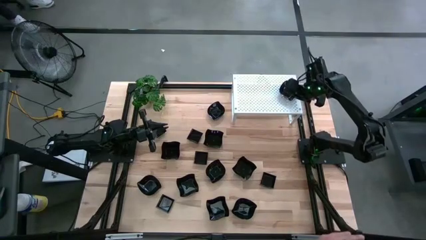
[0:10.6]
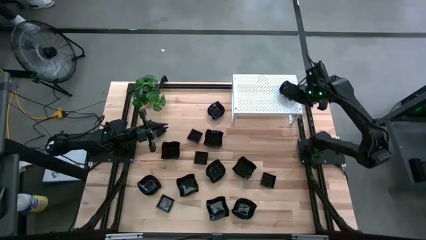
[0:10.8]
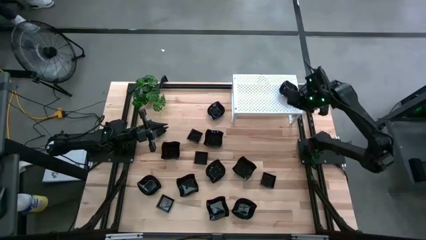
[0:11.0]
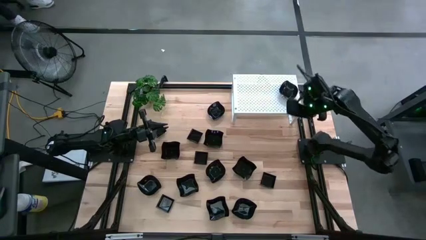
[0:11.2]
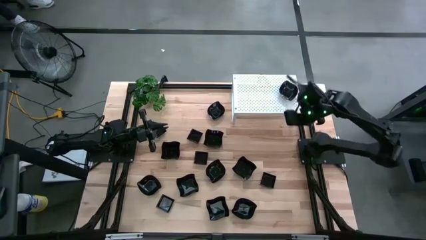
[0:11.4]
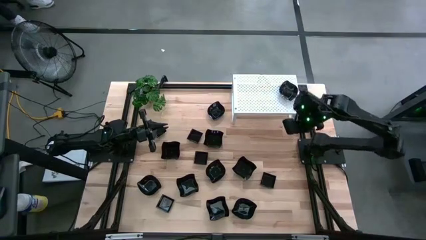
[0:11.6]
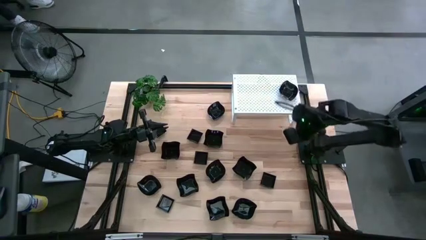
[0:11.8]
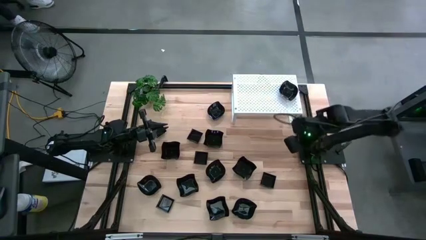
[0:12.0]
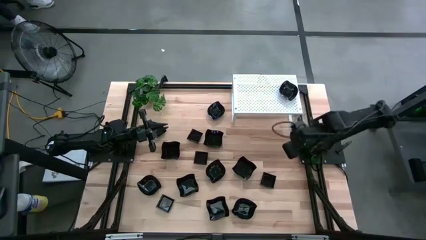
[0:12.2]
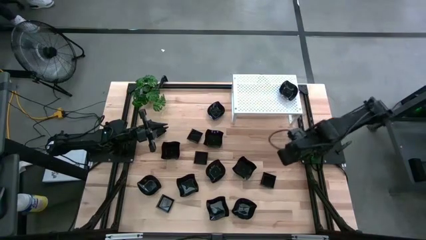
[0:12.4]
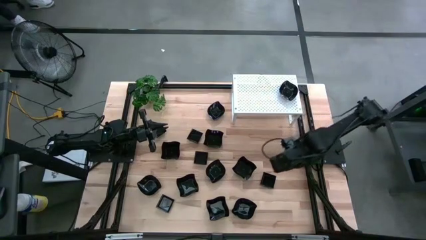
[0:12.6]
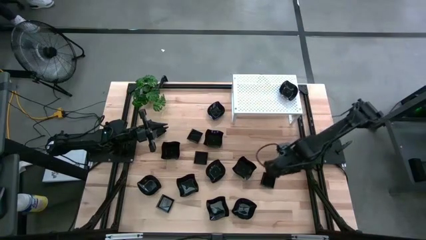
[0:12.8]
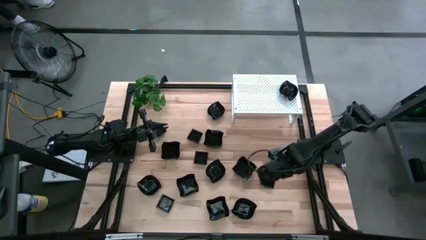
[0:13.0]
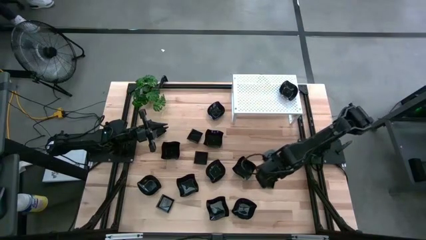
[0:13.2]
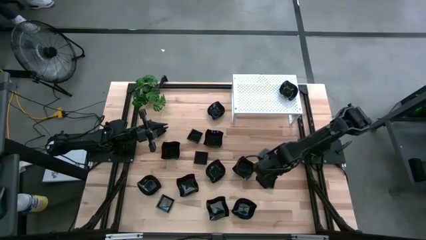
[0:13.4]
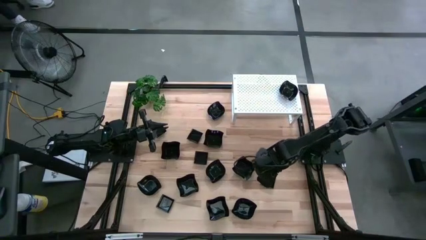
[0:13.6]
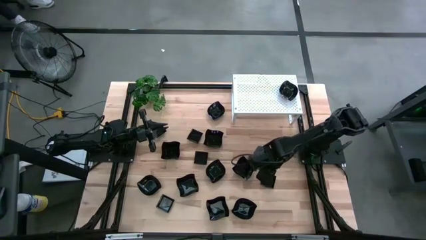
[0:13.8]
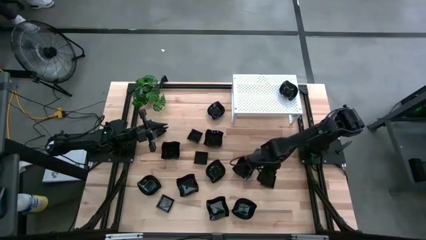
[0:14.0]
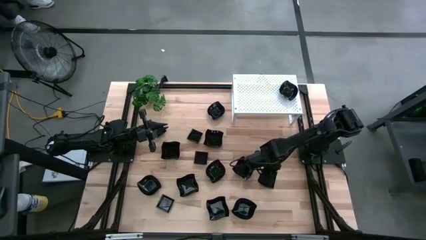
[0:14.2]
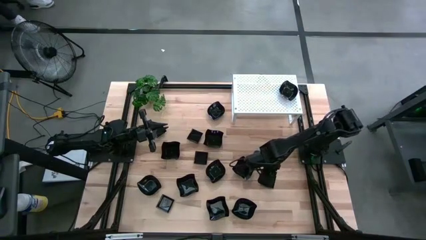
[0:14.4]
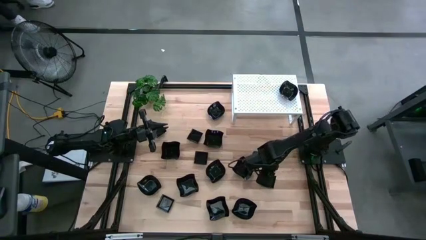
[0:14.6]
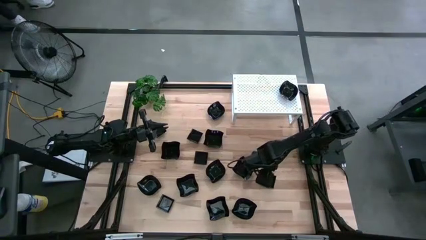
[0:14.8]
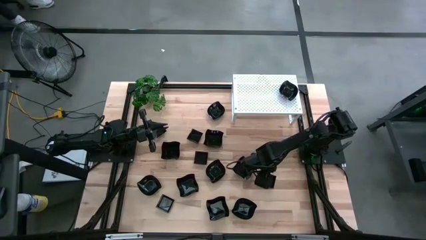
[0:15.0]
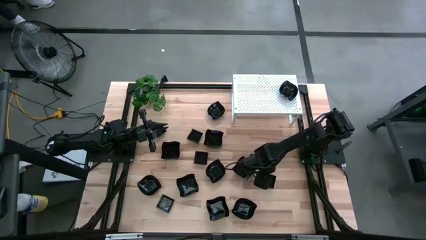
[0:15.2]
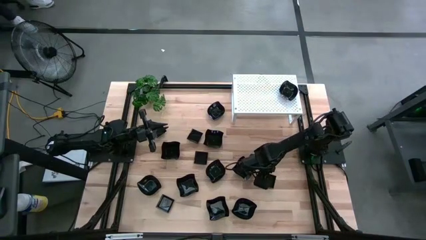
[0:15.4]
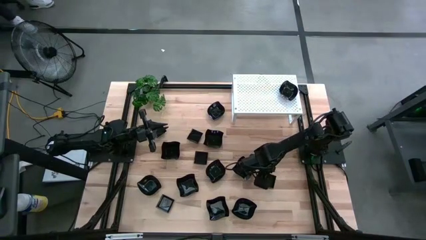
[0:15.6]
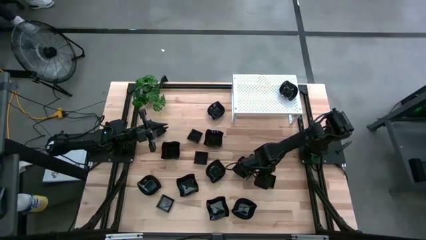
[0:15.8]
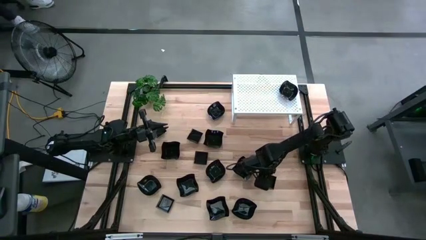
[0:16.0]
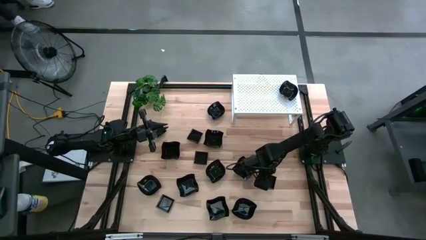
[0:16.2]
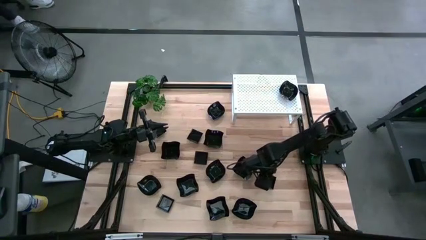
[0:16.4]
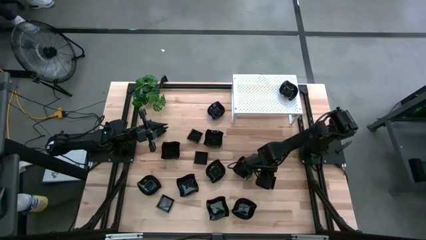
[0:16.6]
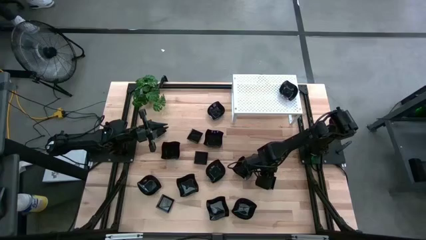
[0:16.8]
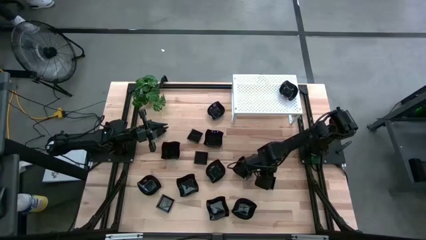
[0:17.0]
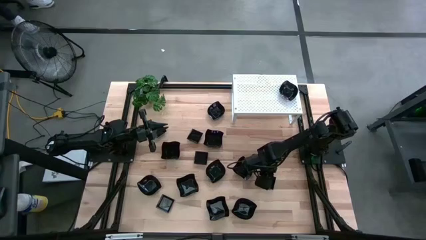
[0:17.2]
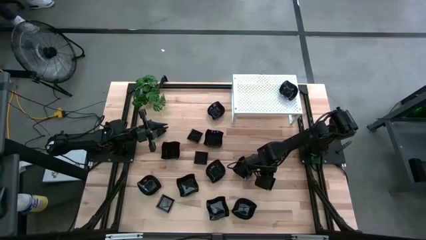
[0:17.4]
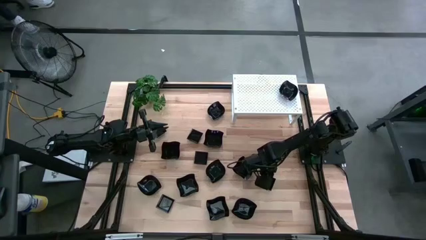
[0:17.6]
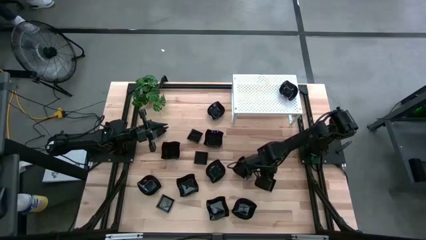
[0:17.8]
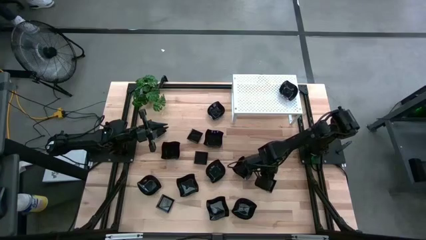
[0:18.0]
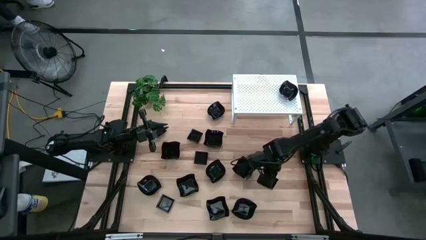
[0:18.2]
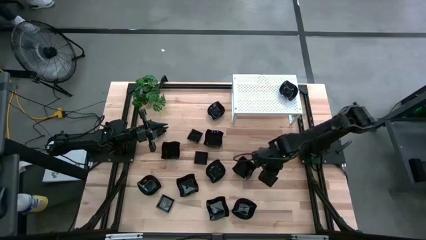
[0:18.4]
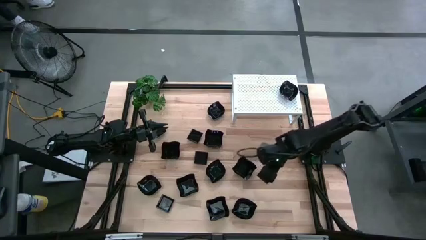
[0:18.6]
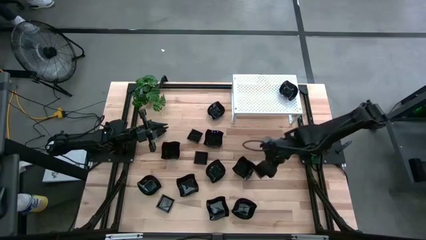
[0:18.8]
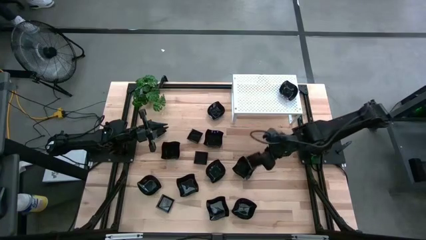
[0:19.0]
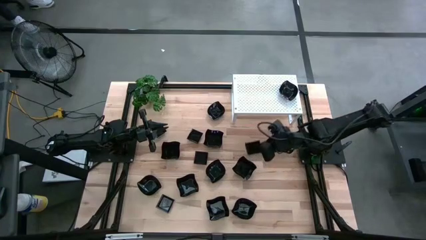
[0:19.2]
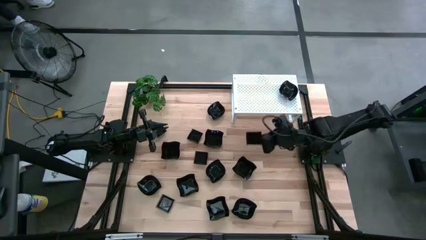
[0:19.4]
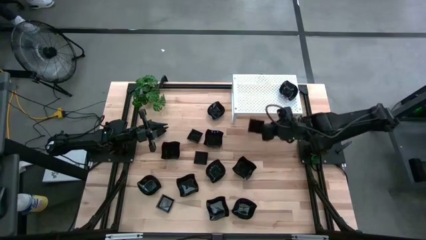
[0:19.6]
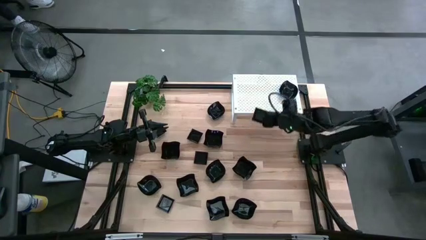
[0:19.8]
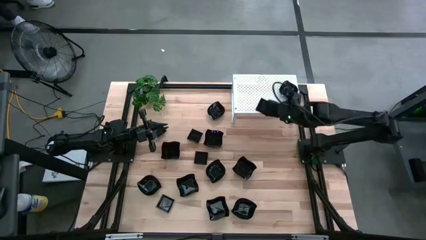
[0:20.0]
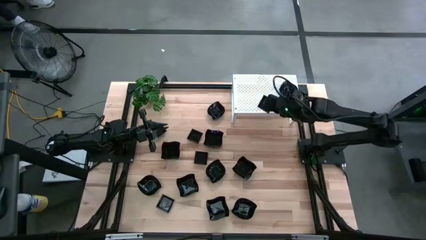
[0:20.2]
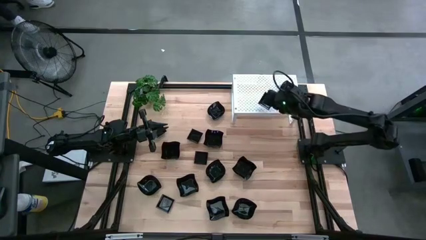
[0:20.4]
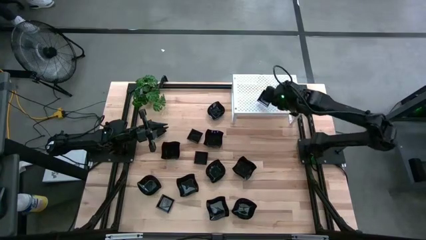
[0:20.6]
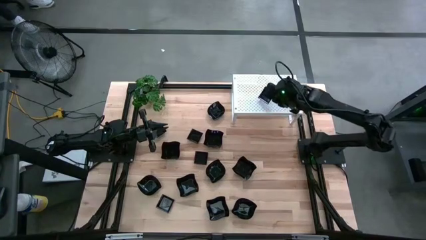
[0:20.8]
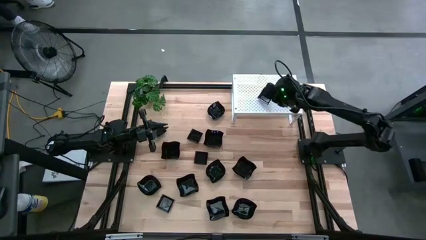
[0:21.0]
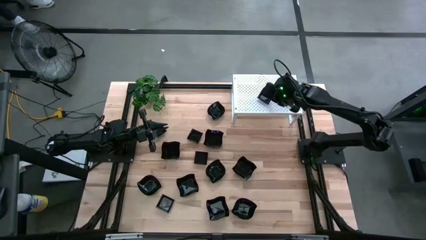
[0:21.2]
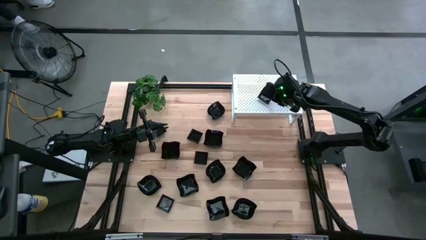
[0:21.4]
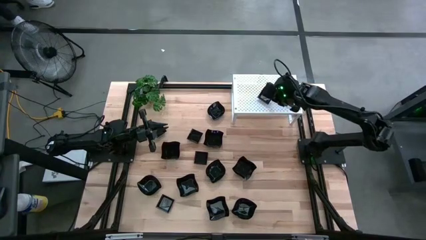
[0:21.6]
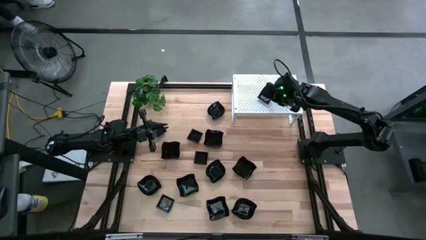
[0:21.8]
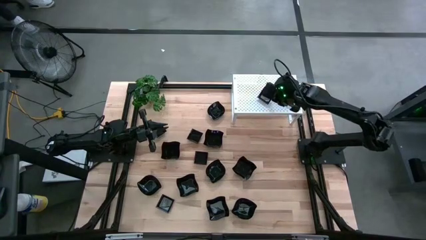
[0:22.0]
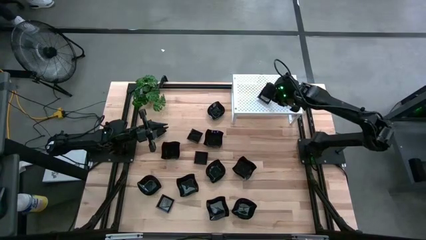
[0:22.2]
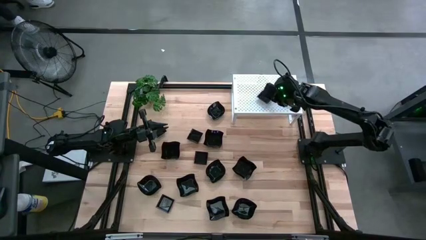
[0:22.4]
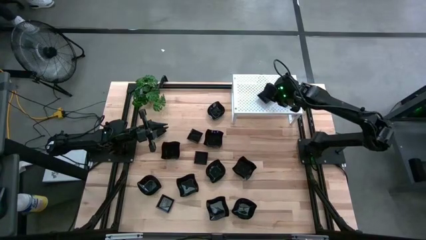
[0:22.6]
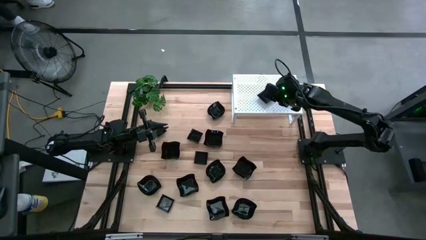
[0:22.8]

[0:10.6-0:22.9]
Task: Pick & Place Mini shaped plates
Put the square plate on the shelf

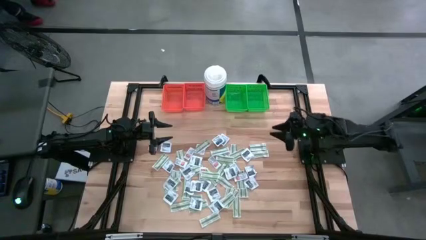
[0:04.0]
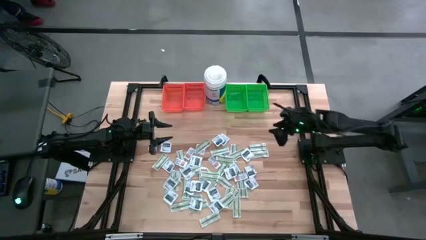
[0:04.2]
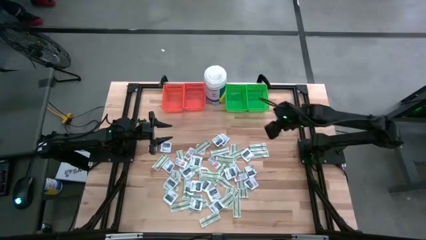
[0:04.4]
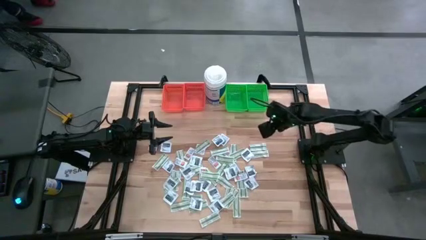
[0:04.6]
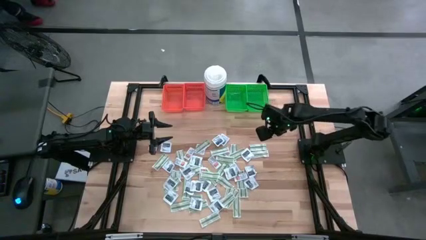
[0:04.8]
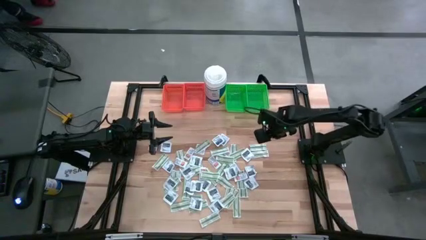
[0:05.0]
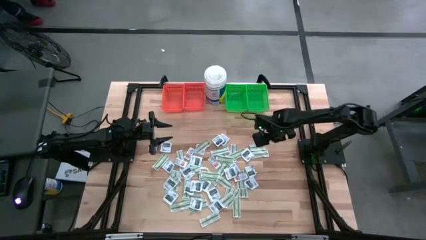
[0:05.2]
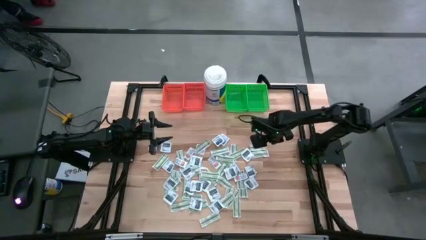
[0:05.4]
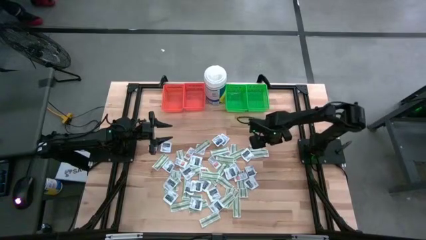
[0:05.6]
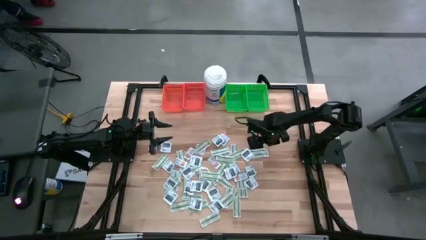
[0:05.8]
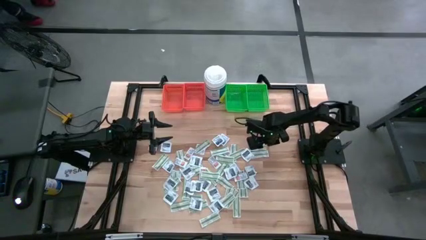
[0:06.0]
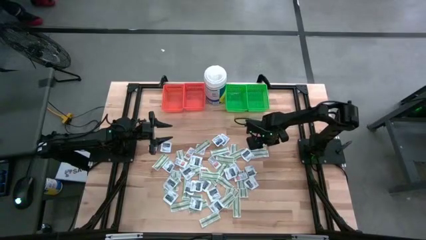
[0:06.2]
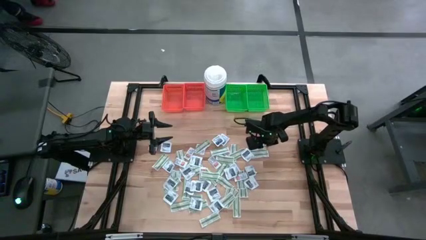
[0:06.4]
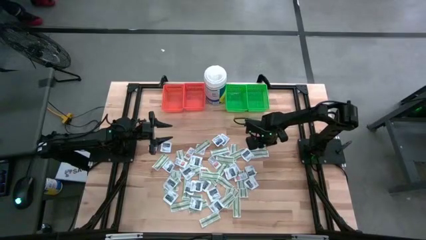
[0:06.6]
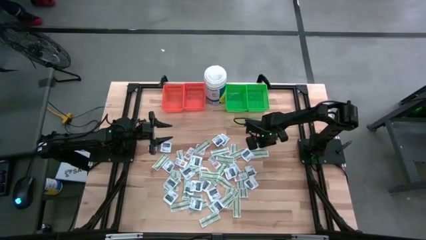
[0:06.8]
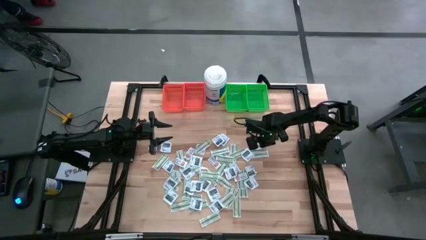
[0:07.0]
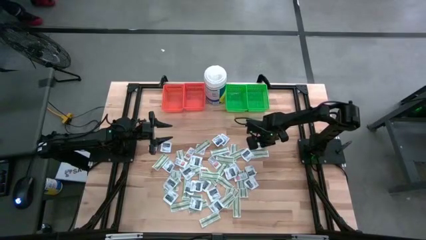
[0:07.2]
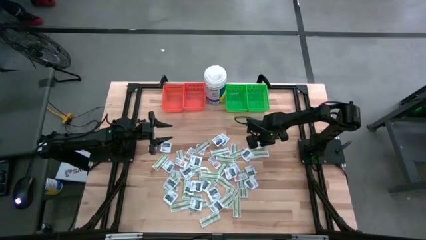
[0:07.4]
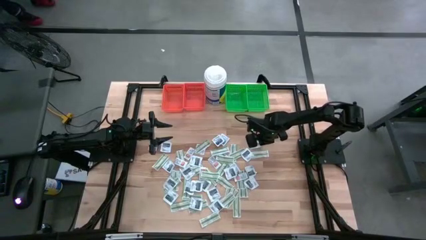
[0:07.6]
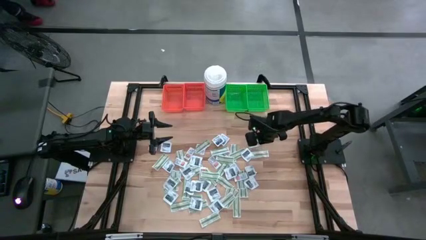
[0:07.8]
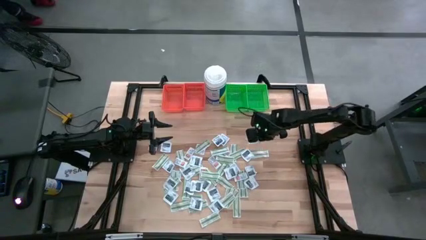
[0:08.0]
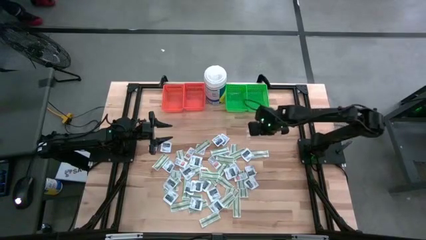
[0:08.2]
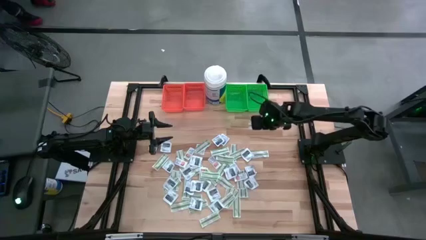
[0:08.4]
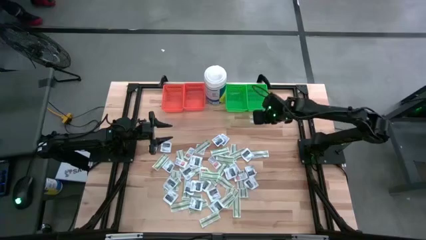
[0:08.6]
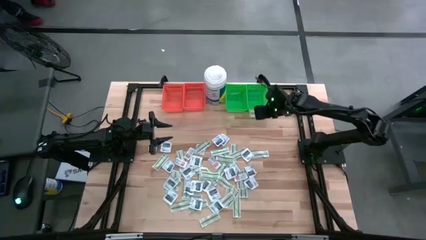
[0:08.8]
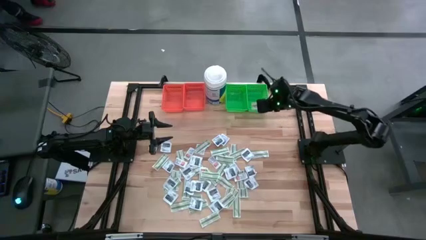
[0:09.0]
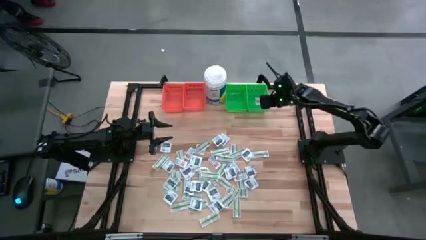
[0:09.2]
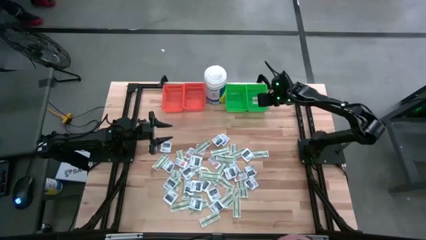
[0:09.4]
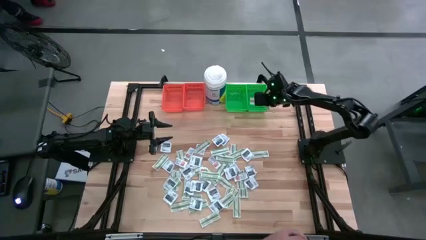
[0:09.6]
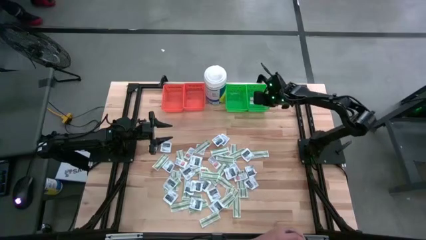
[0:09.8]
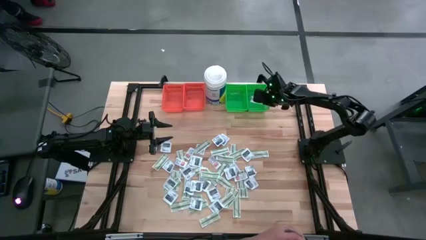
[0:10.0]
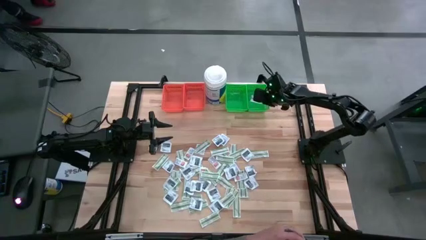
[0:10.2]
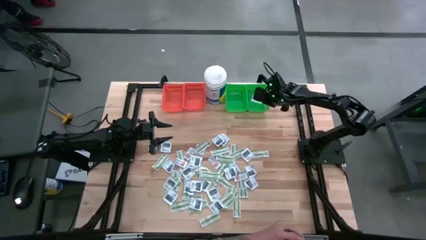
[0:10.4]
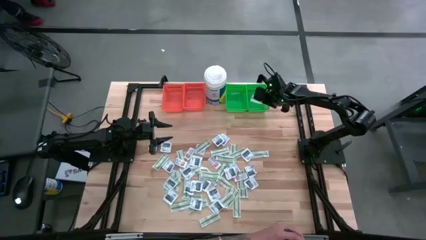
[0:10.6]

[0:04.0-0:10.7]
Task: Pick & Place First Aid Supplies
Put the green bandage pack into the right green bin
